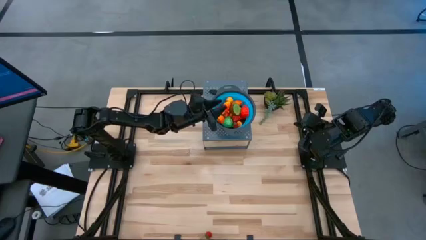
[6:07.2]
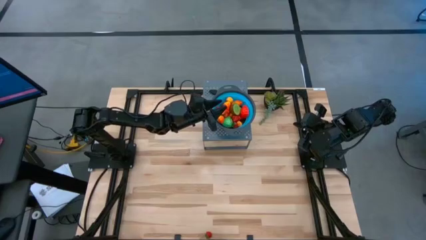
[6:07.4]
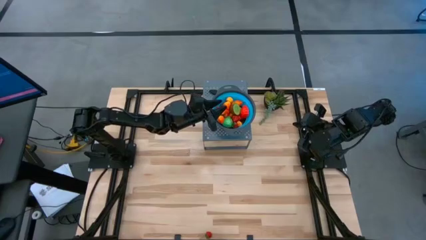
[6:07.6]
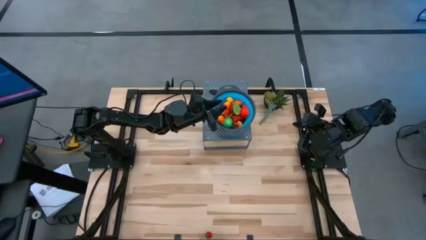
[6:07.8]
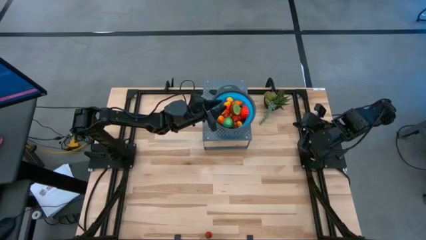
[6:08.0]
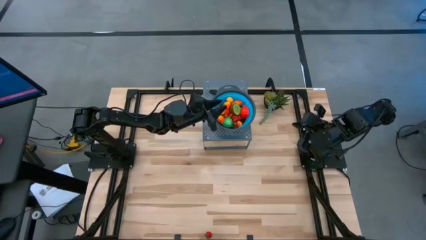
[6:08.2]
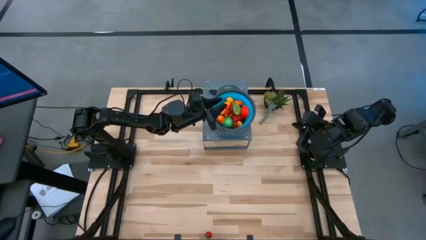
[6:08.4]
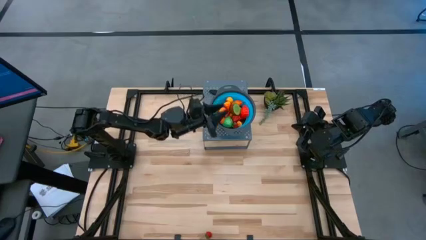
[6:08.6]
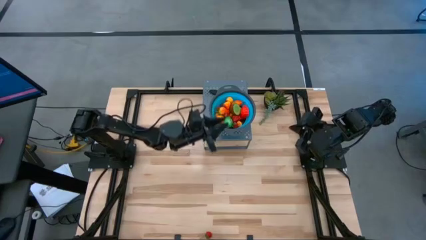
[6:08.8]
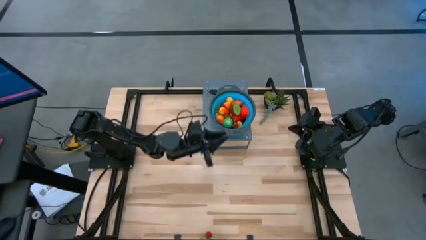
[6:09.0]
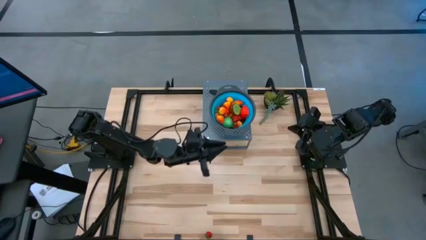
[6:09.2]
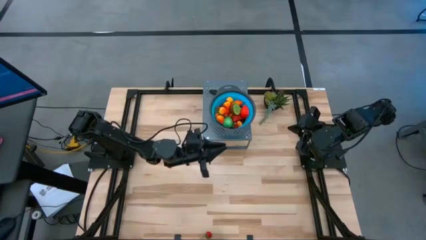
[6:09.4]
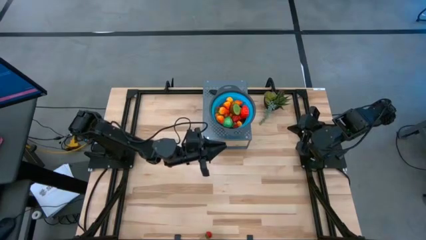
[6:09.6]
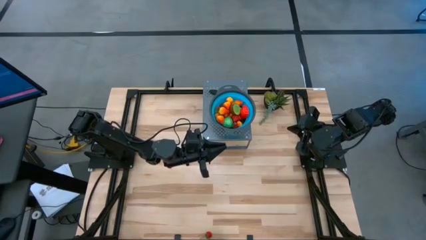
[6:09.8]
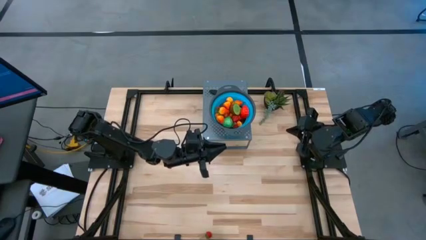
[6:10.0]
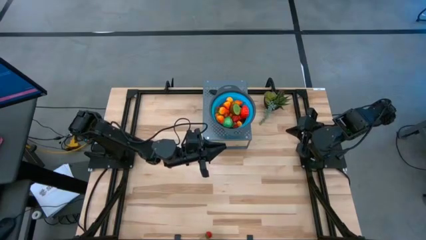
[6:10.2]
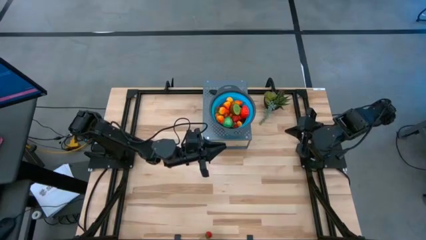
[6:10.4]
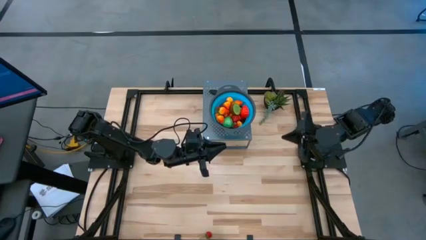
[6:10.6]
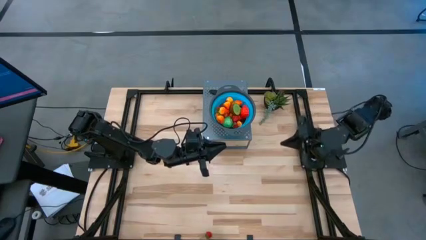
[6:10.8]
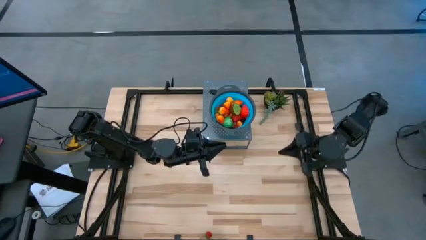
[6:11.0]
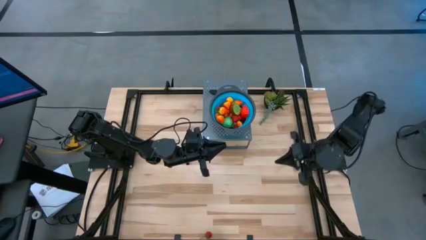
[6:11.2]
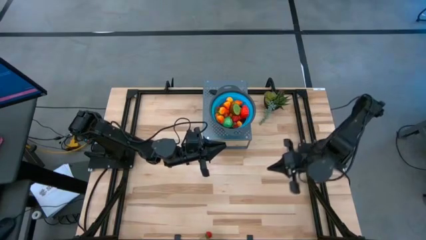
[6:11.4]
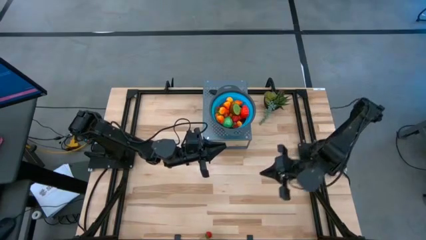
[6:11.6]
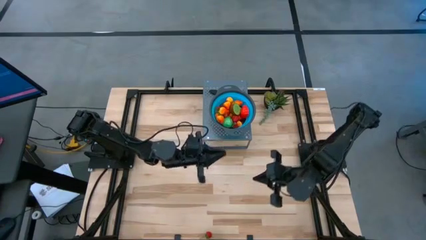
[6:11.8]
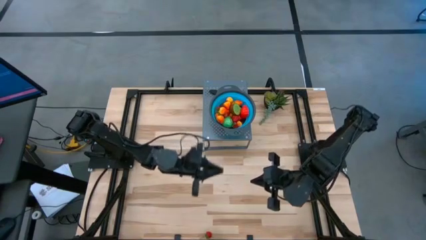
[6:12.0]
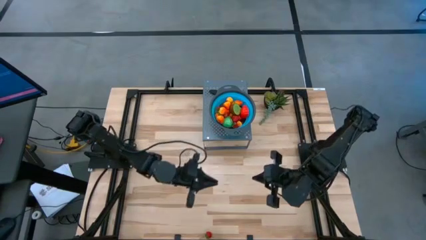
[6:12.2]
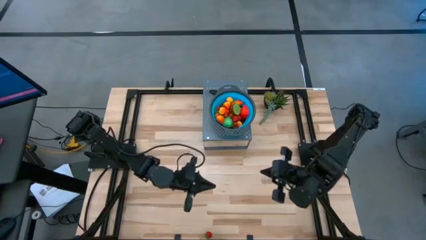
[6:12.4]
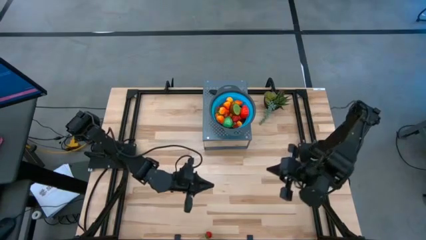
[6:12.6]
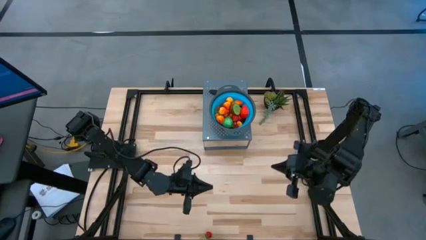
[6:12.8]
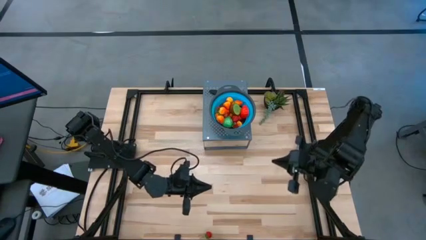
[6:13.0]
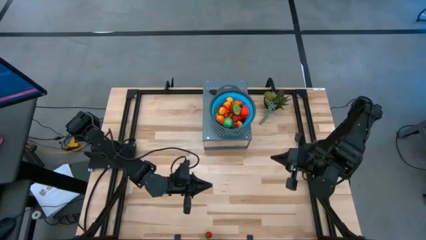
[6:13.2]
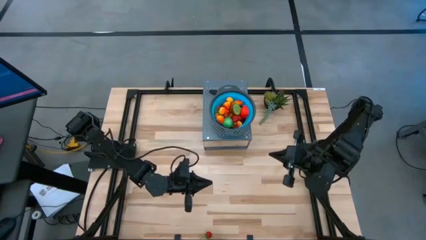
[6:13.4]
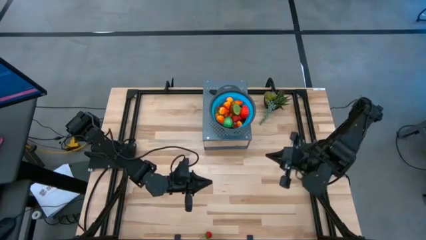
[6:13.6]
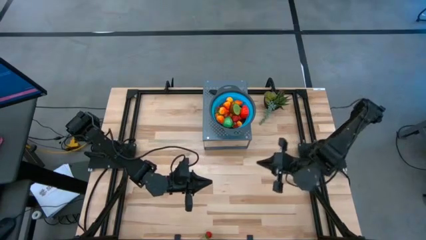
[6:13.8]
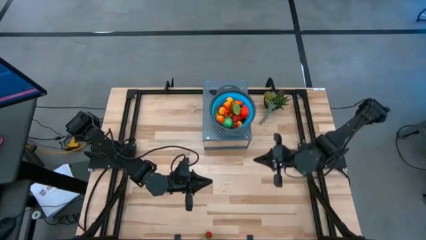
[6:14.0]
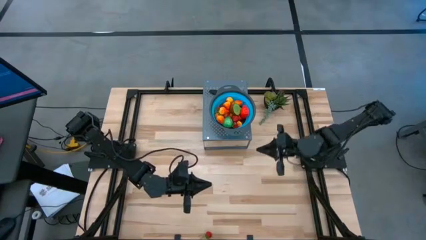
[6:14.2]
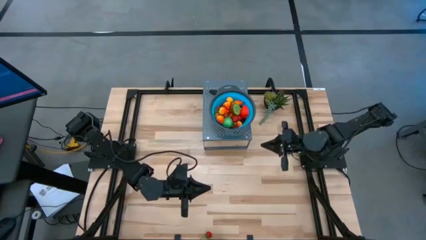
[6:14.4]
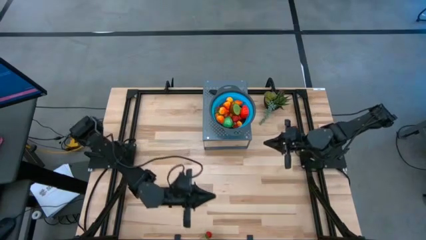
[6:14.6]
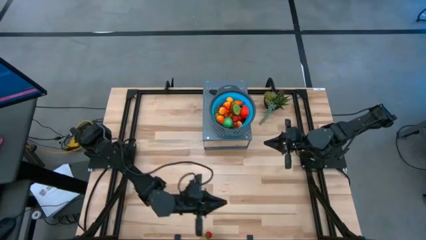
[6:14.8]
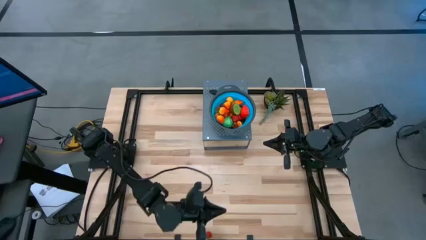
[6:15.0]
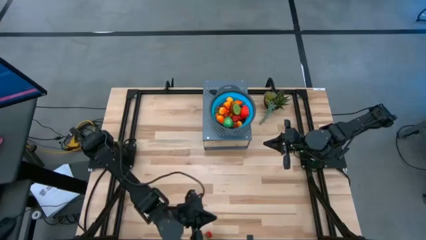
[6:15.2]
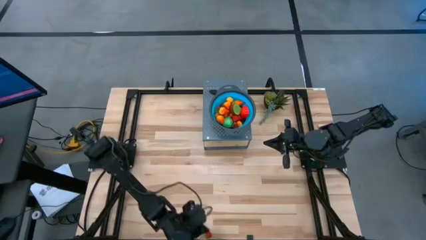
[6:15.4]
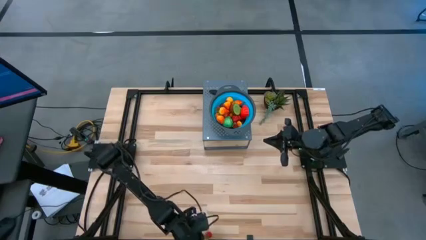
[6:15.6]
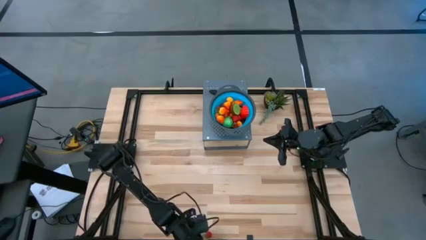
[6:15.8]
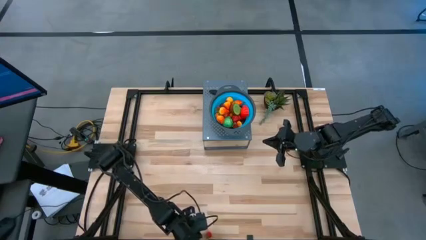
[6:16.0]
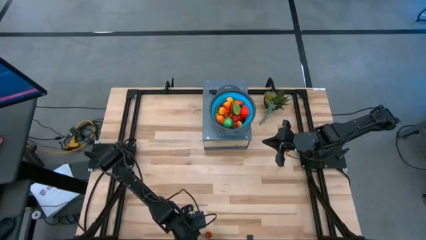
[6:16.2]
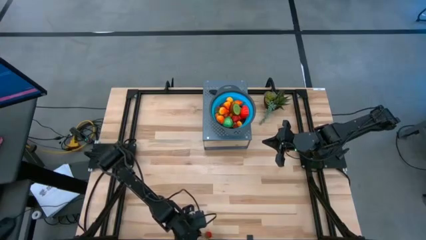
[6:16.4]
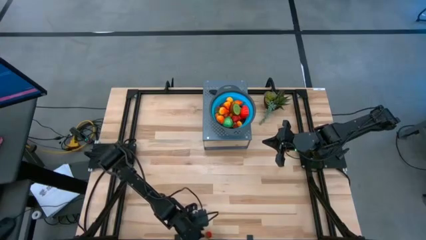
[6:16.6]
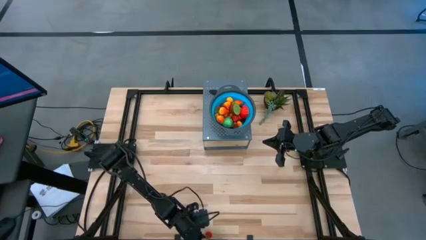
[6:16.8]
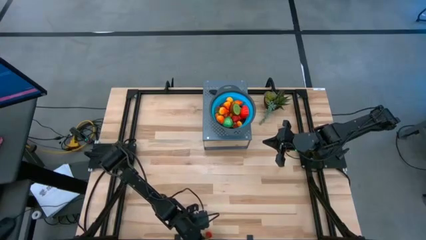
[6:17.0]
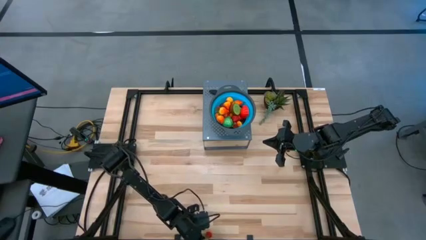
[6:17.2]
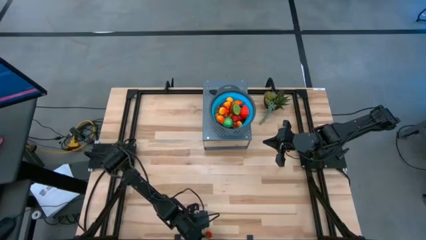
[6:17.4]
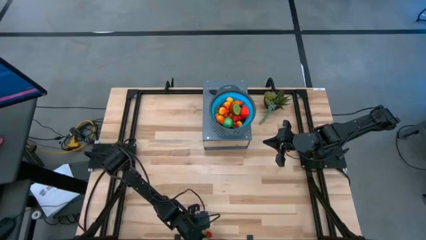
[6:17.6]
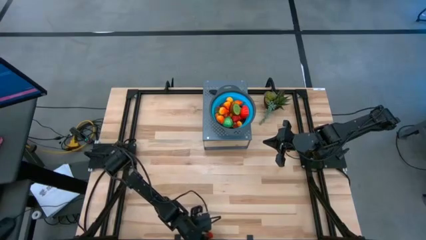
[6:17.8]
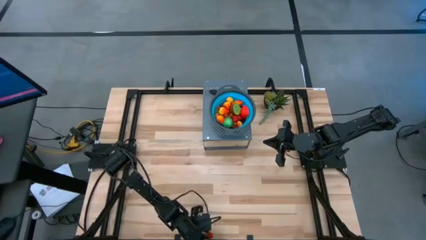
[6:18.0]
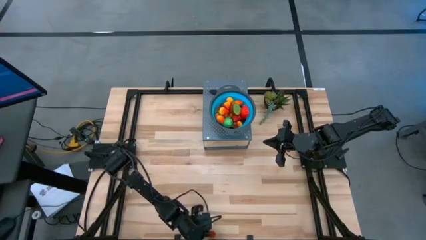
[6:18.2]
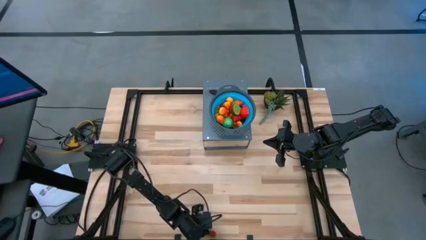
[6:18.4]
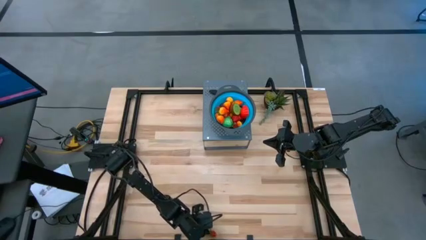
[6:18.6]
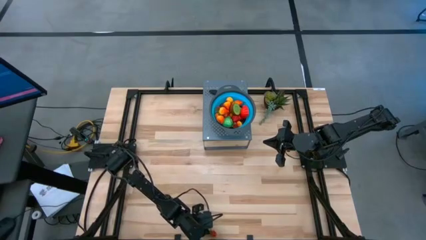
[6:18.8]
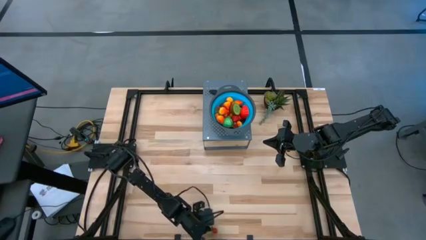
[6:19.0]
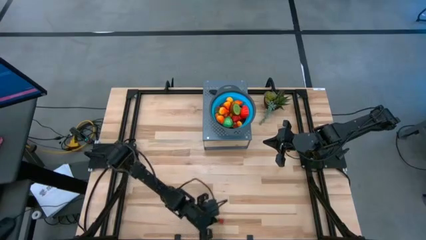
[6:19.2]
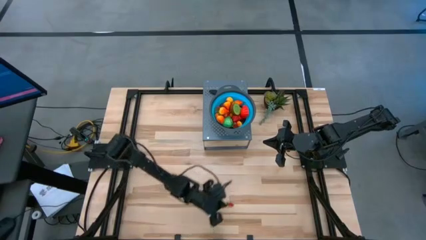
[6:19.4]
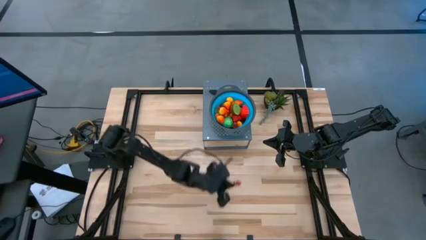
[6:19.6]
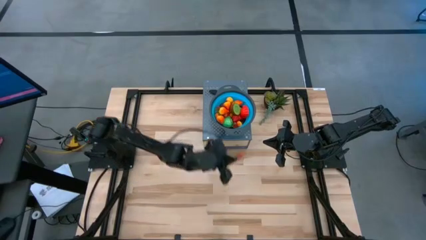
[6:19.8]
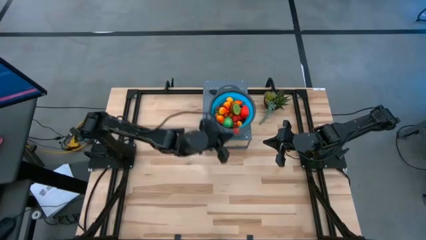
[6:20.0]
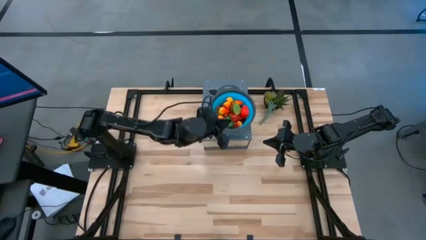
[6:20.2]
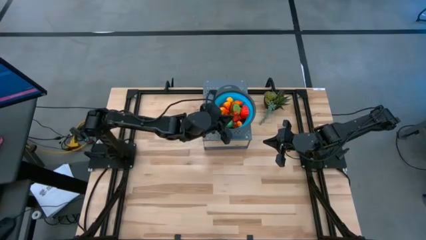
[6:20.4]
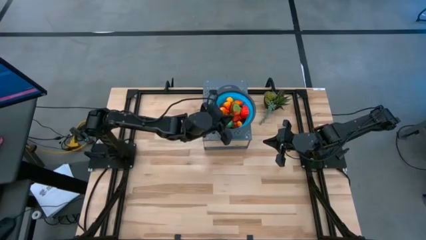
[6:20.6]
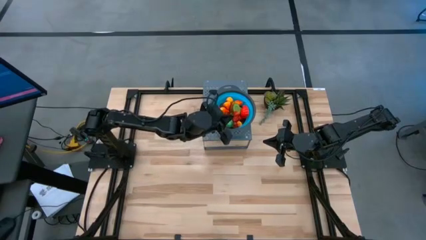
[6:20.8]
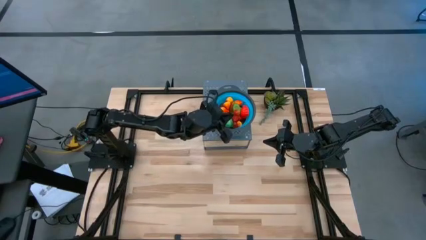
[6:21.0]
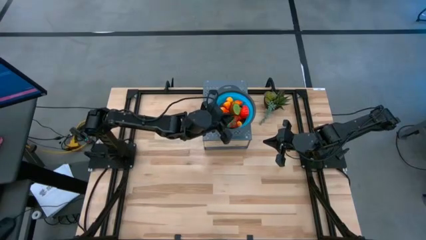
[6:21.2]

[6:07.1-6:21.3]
Task: Pick & Place Fruit
Put the strawberry into the strainer bowl
